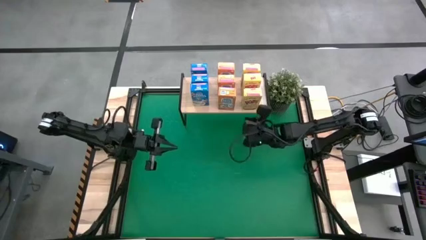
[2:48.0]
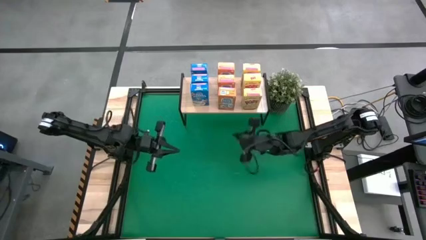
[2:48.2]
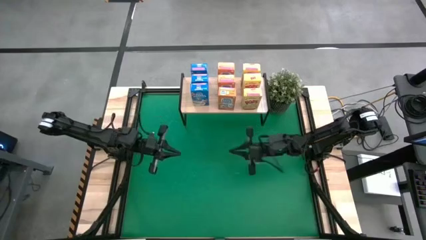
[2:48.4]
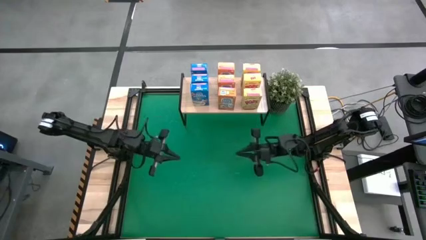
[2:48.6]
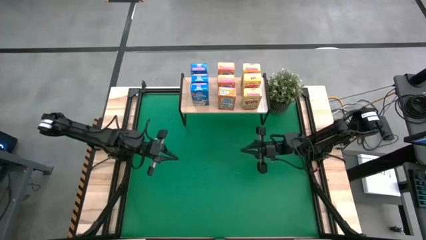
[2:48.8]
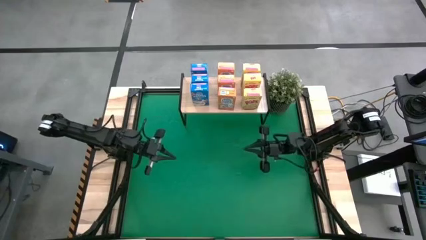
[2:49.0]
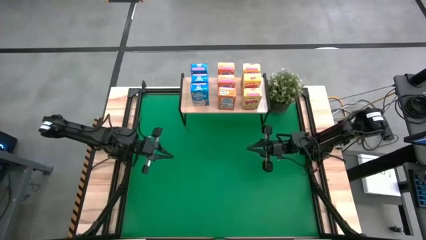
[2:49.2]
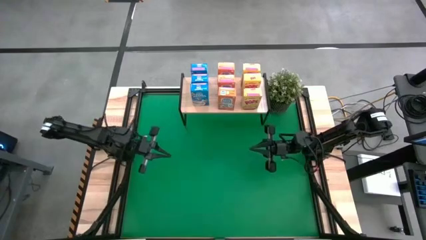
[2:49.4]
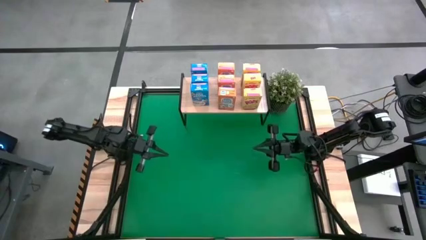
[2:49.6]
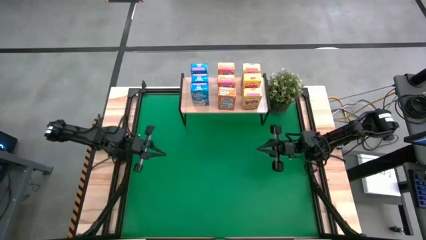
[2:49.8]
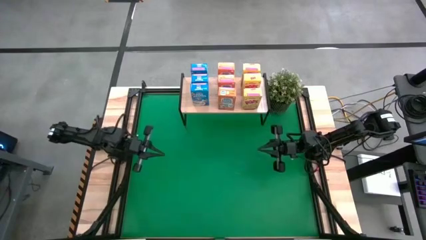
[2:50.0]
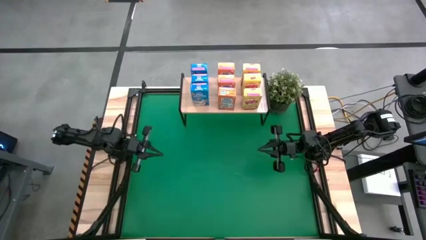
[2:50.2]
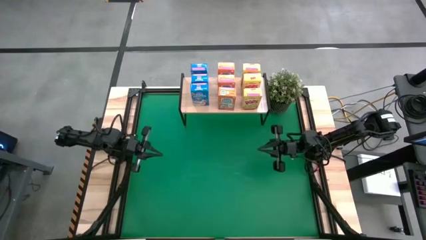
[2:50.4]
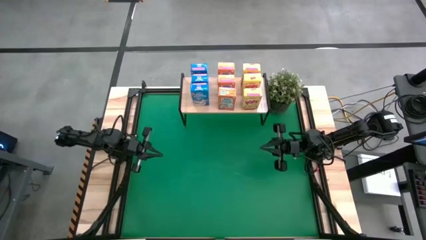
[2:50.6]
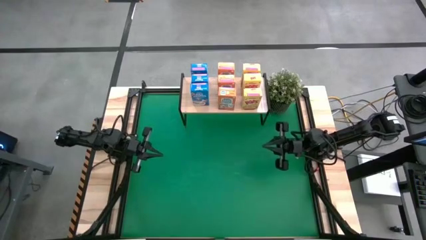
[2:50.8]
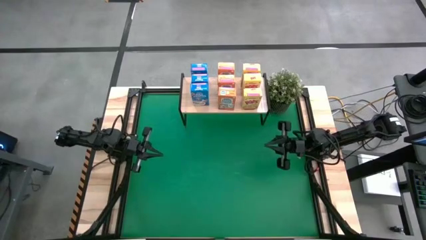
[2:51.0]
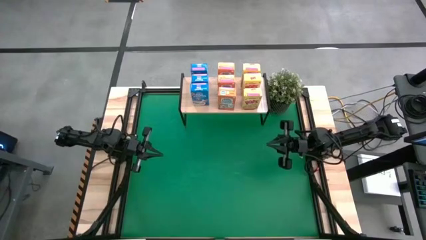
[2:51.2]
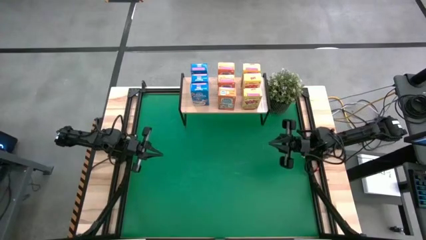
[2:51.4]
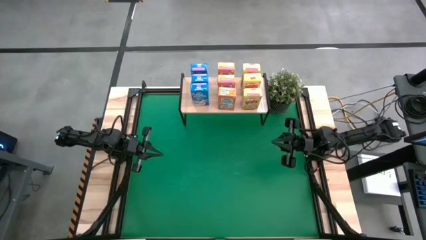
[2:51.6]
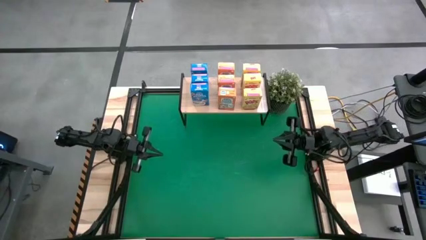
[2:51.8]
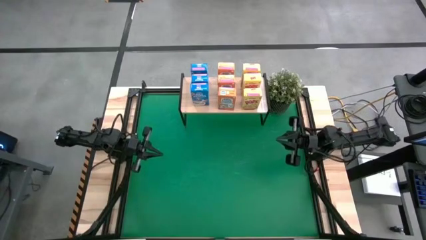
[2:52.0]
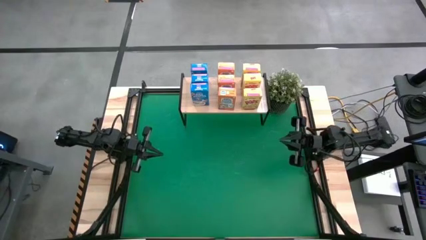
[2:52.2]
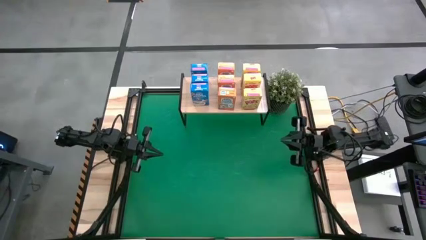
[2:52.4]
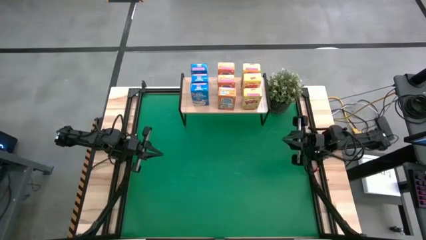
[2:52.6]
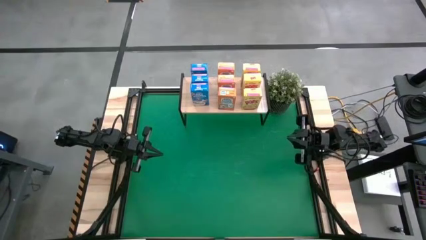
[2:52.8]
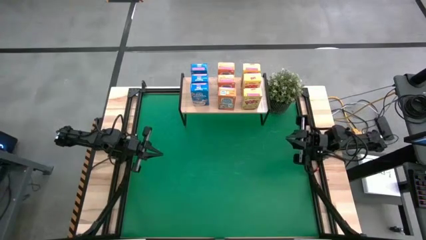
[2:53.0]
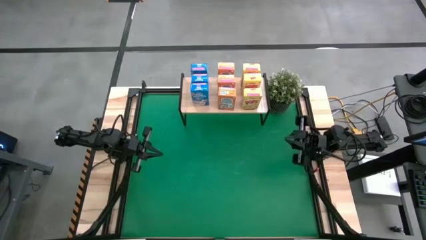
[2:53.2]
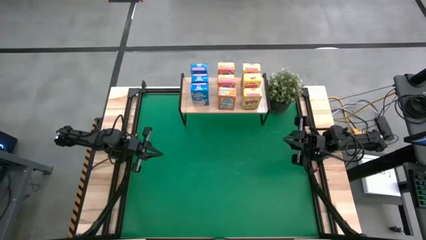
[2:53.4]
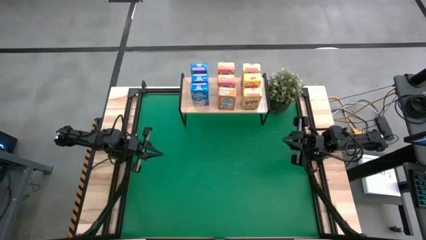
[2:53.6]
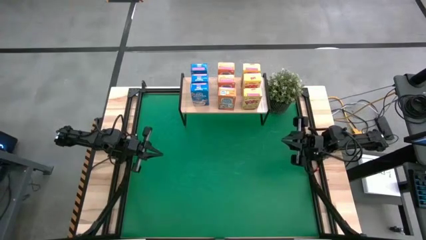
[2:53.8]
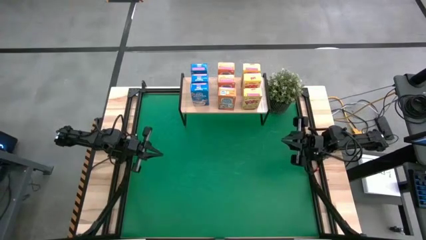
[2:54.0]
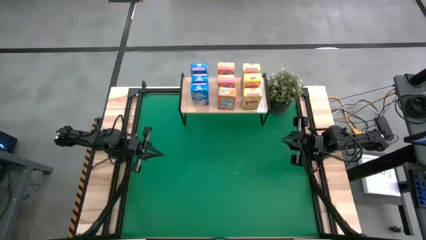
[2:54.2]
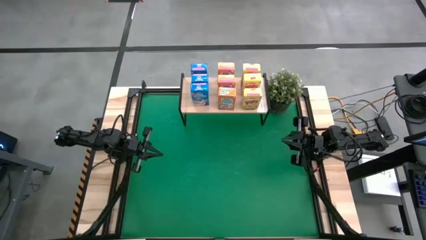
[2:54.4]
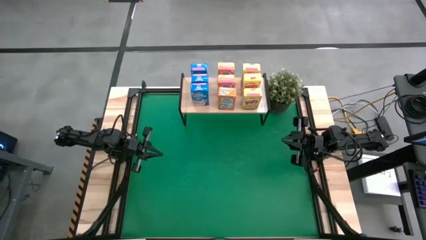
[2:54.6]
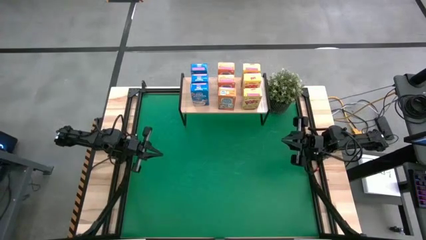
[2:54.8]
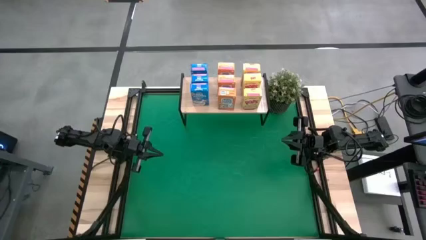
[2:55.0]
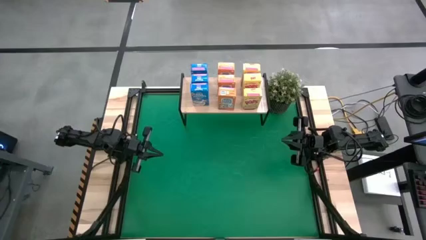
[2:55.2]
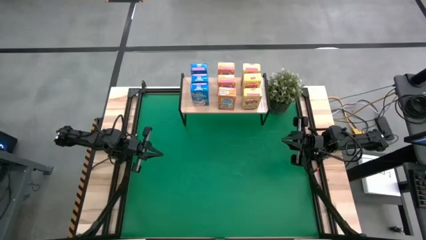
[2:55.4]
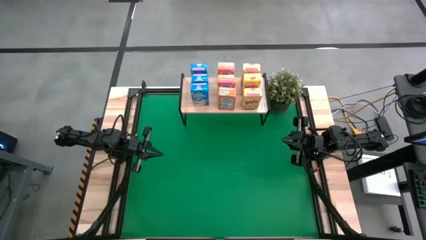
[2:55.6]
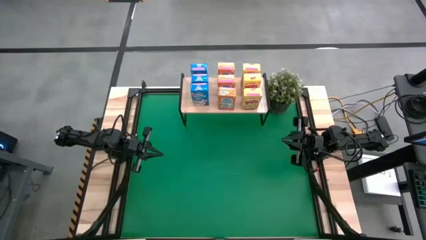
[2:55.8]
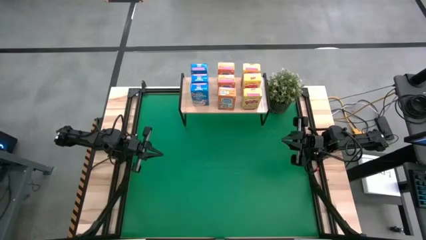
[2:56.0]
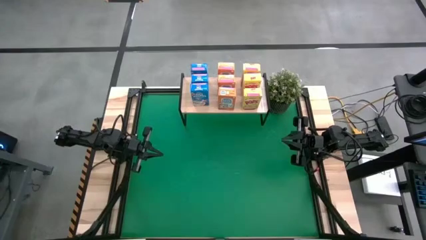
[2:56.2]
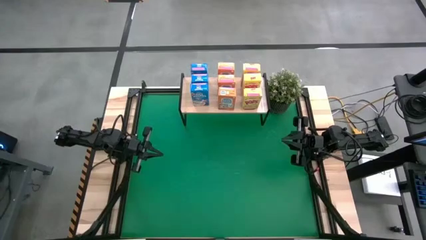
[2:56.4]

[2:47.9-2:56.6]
Task: Stack cereal on shelf
Return to home position

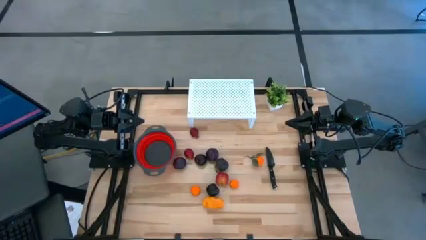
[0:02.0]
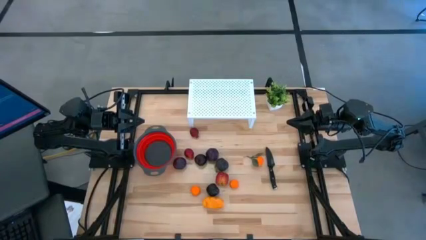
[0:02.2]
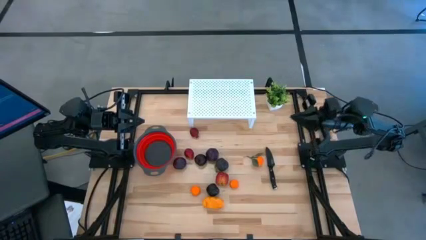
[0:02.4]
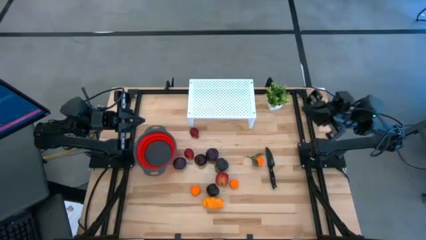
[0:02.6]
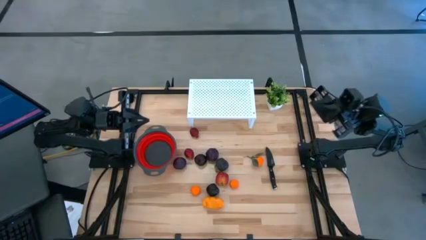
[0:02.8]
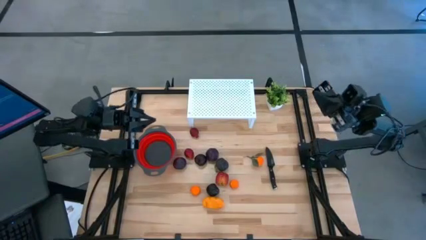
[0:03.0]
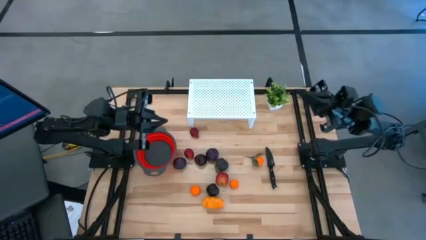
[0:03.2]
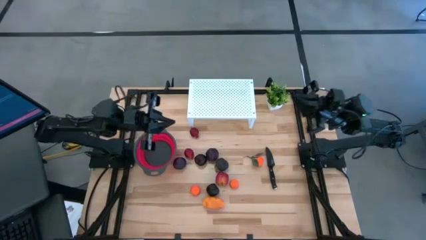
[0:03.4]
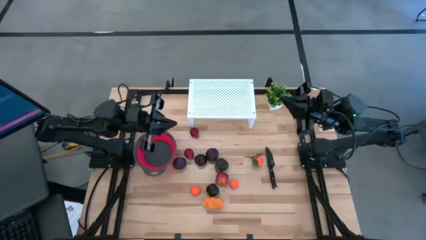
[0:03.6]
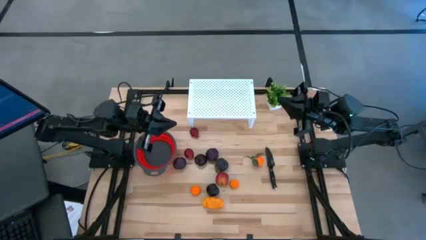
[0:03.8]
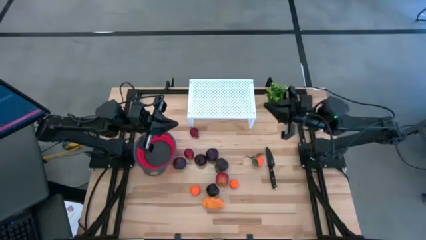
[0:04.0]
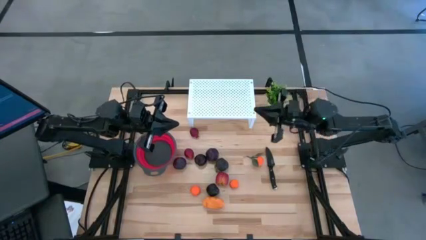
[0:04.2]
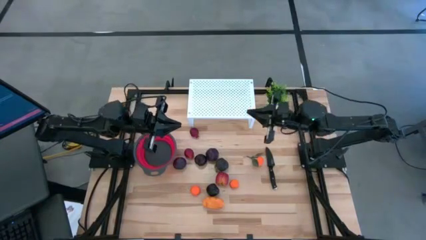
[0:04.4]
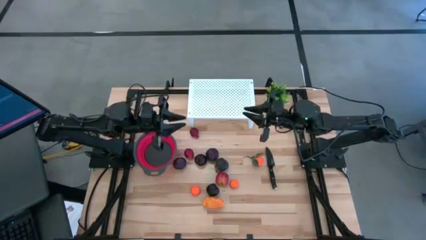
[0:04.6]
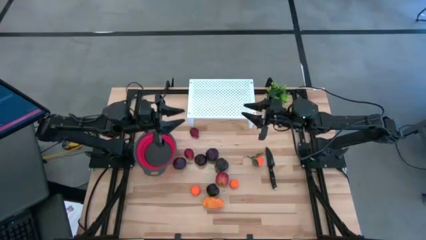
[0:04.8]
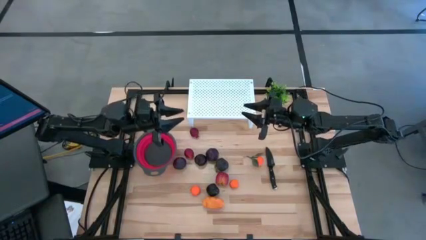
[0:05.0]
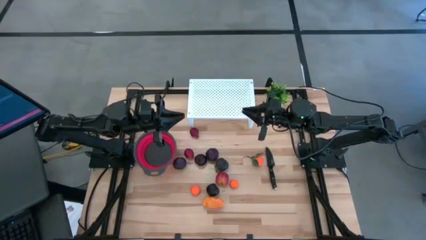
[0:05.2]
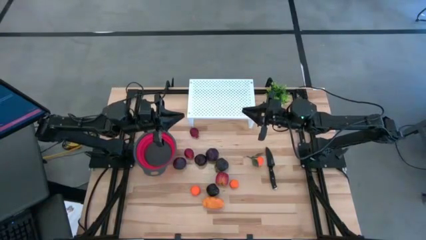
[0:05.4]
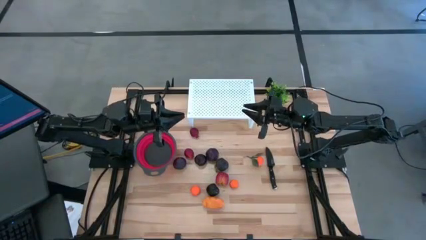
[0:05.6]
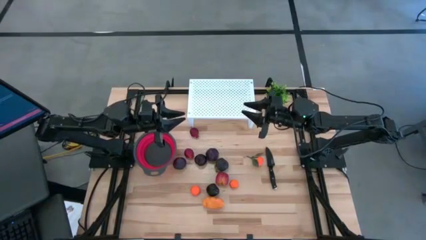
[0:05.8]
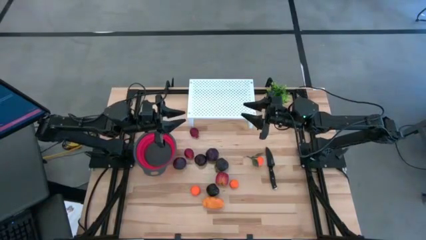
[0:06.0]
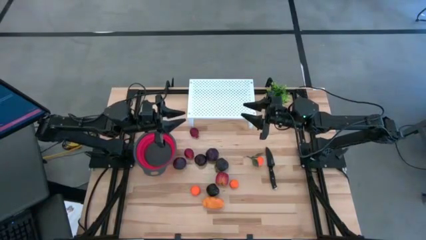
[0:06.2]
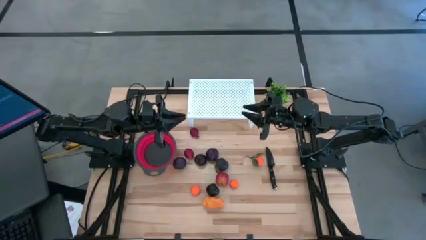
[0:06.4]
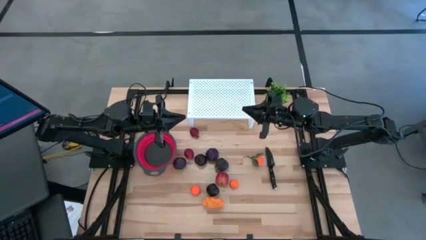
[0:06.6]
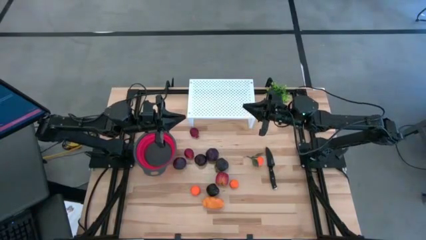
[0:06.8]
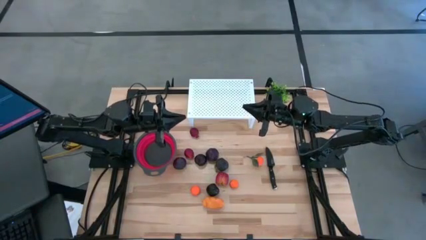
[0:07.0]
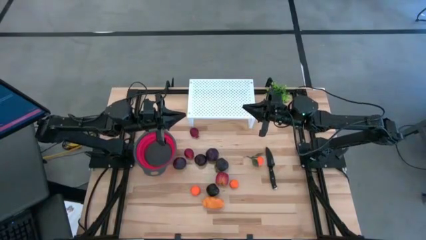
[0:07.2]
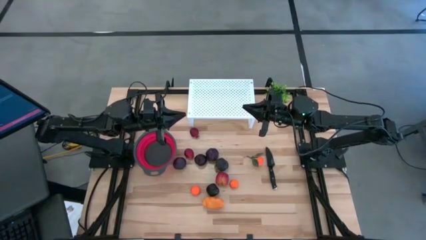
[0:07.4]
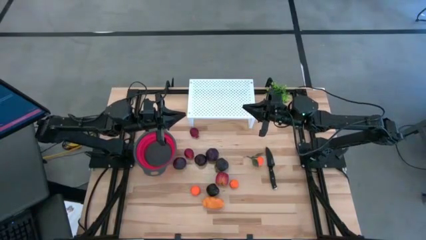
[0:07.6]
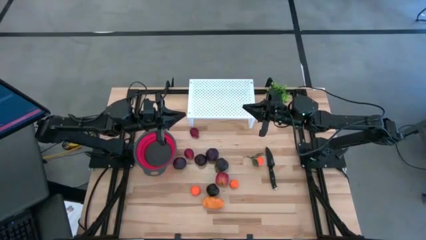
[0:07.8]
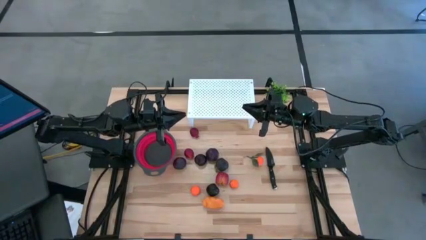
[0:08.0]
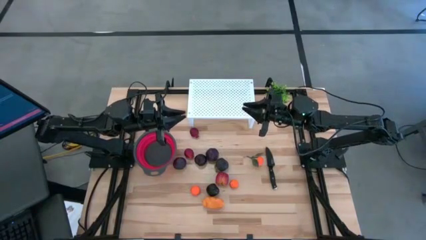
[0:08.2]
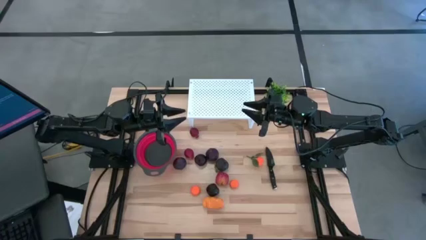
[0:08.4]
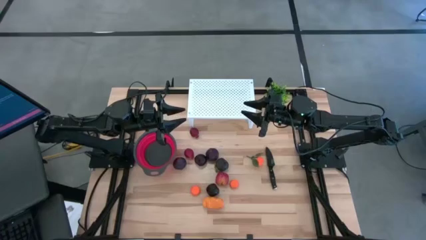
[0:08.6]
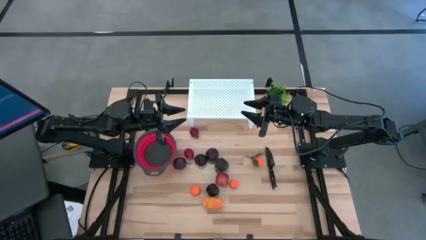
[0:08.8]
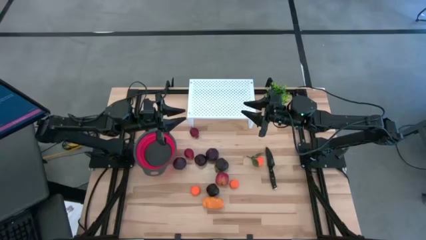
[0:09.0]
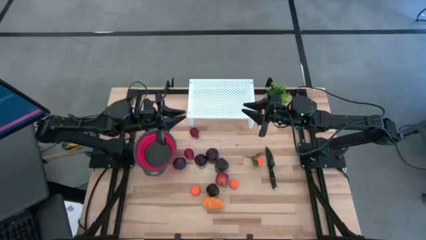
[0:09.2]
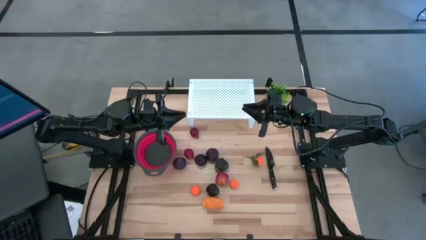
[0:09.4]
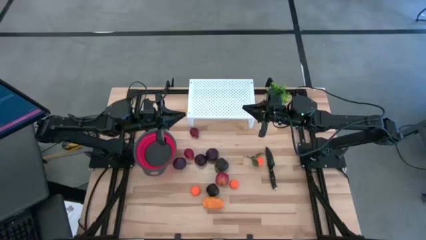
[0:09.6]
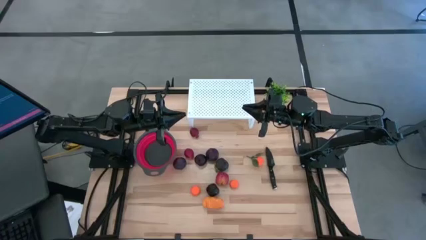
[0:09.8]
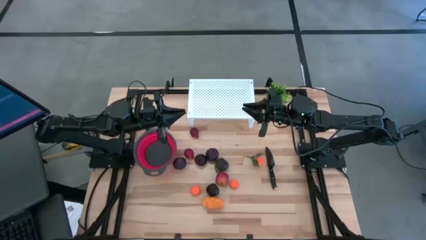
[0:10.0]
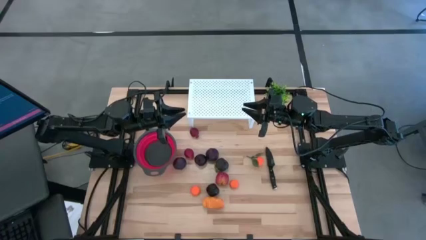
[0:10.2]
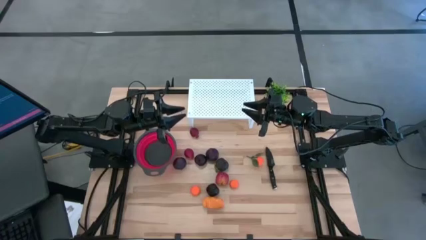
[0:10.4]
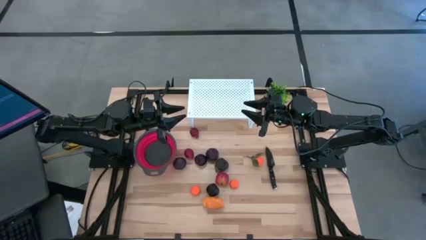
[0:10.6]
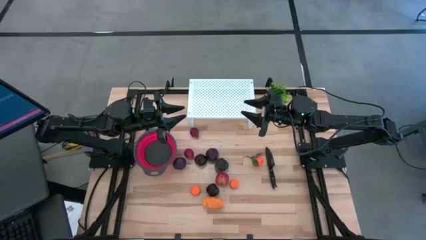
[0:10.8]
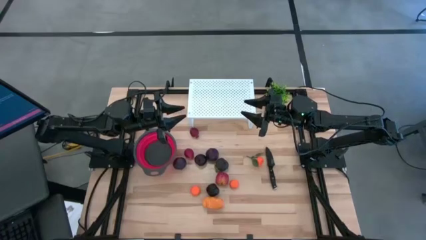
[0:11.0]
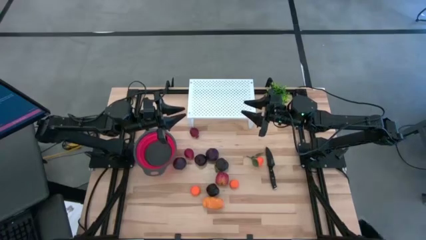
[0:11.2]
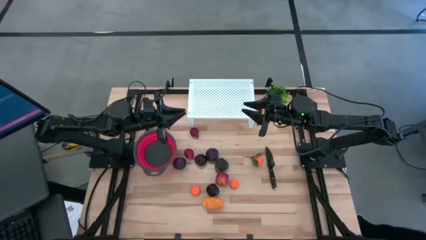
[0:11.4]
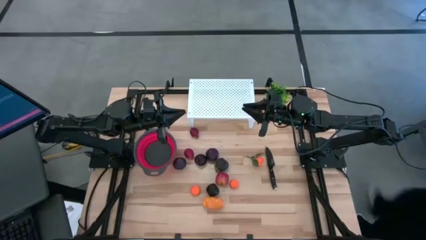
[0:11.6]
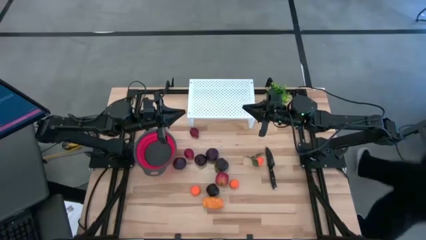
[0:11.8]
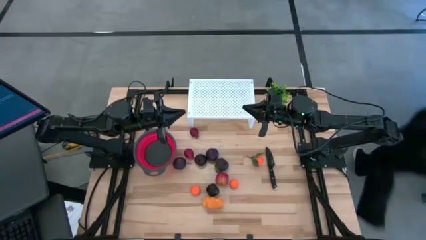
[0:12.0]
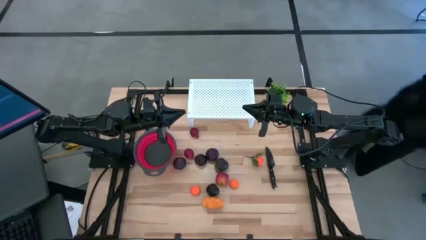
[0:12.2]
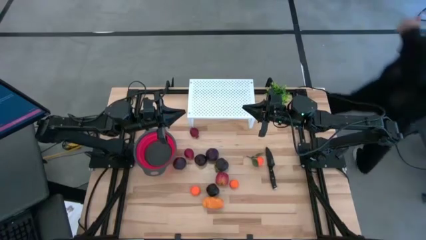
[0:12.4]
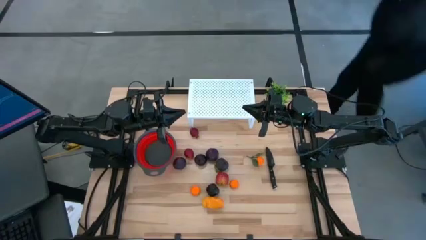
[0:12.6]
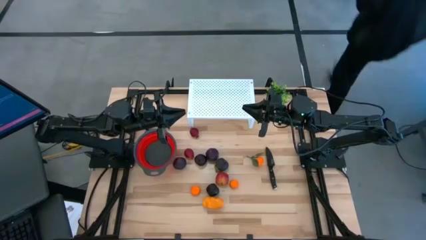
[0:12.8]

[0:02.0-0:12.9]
Task: Pick & Place Fruit
Put the strainer bowl on the left side of the shelf
